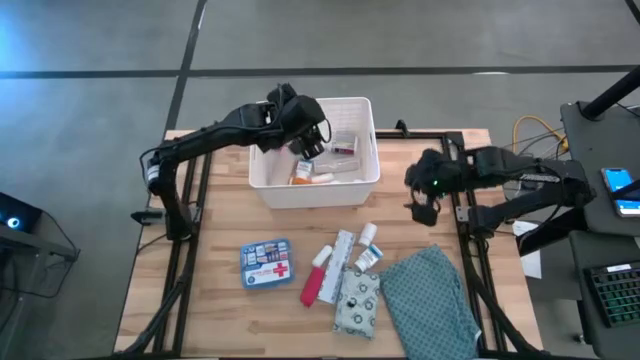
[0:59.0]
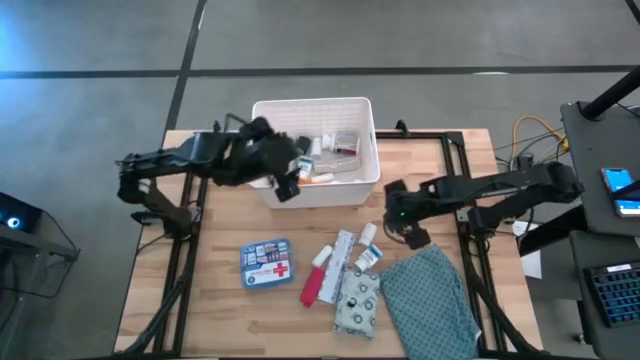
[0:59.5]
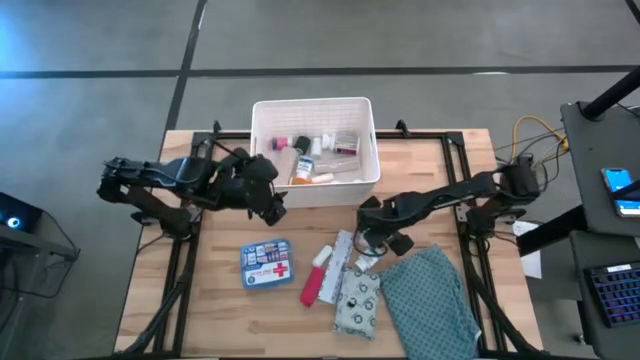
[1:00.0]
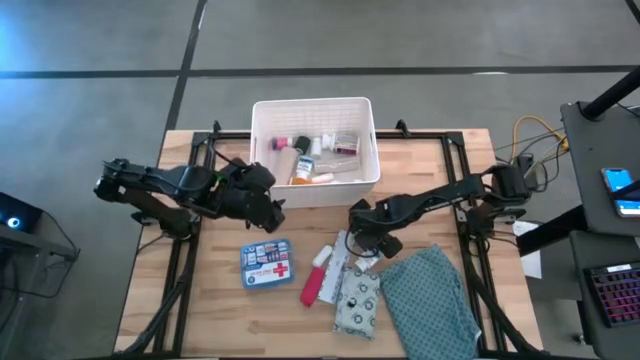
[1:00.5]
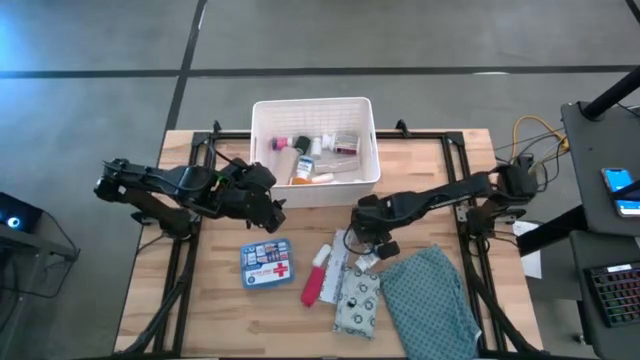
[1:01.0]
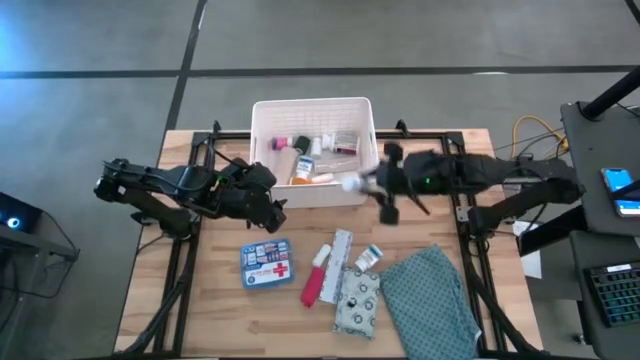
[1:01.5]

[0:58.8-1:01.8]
Task: Pick & place medical supplies in basket/bin
Put the white bottle into the white bin

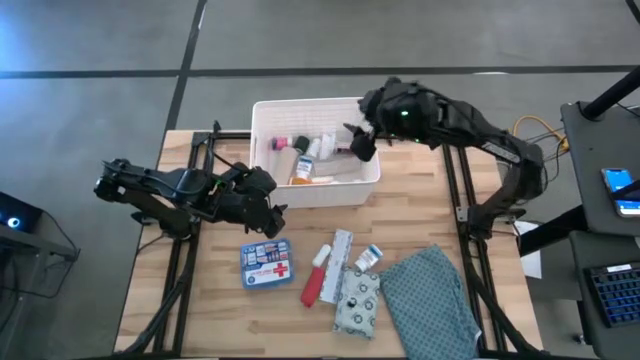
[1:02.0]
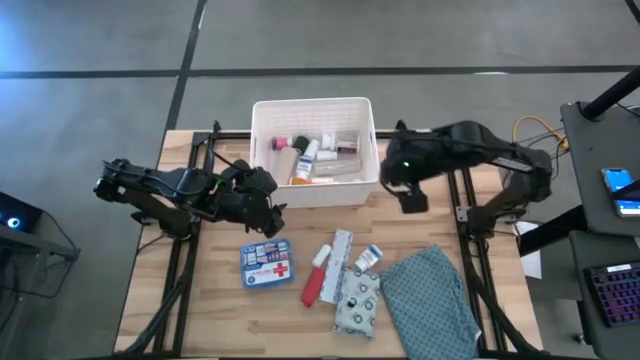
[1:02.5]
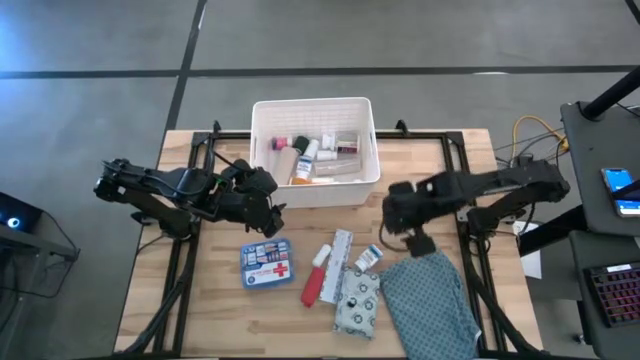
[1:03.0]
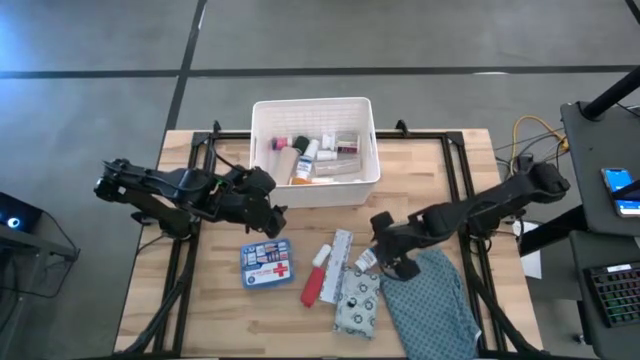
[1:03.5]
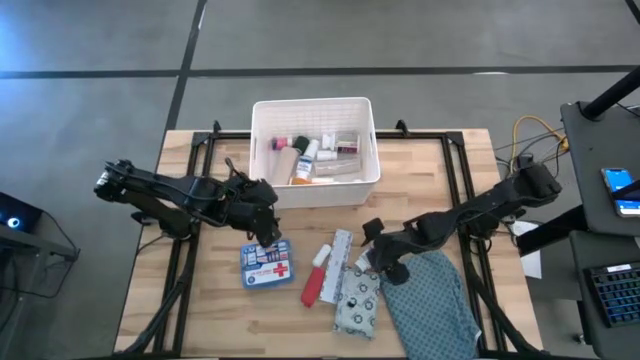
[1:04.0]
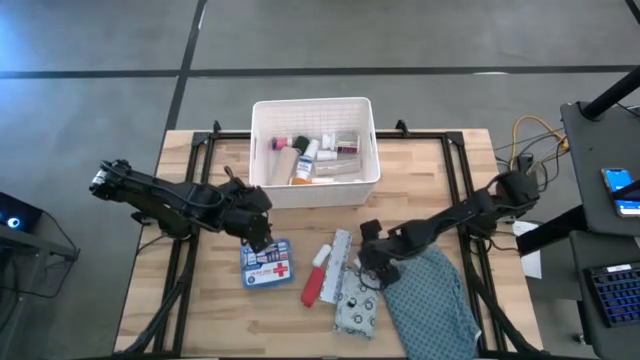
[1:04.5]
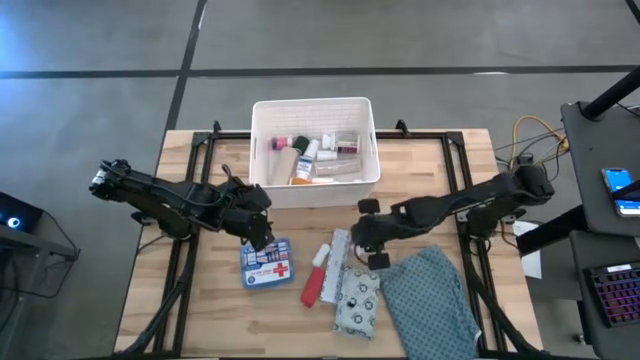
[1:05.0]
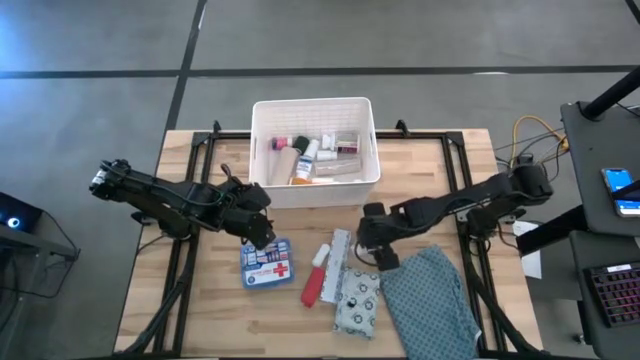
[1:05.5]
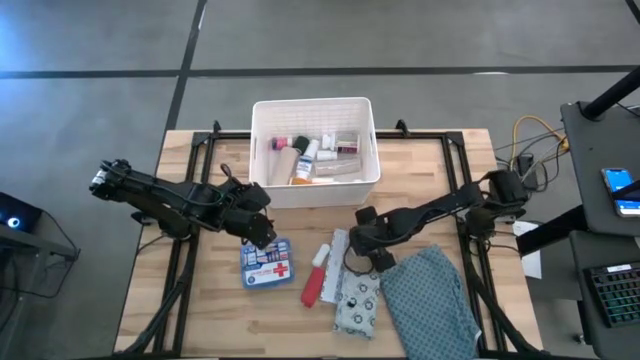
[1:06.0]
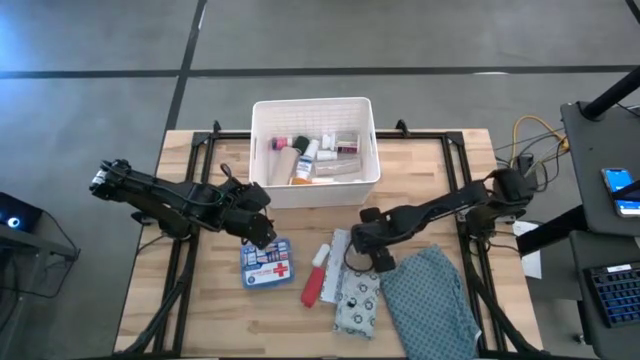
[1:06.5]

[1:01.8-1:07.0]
Put the white and blue bottle into the white bin

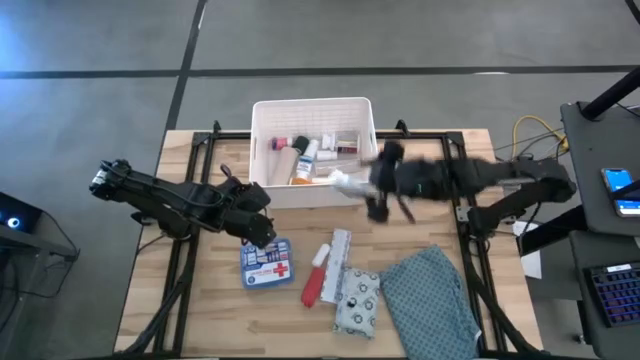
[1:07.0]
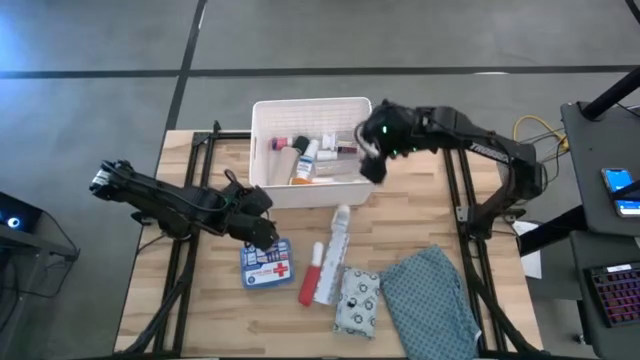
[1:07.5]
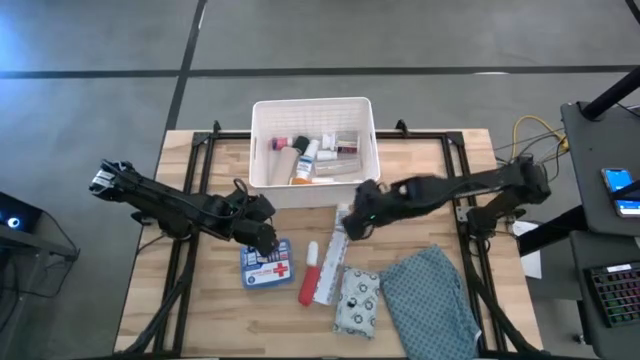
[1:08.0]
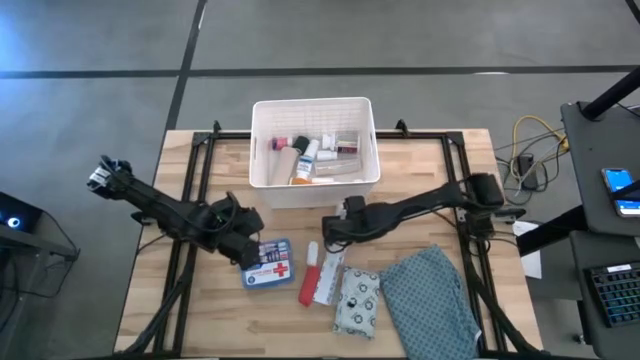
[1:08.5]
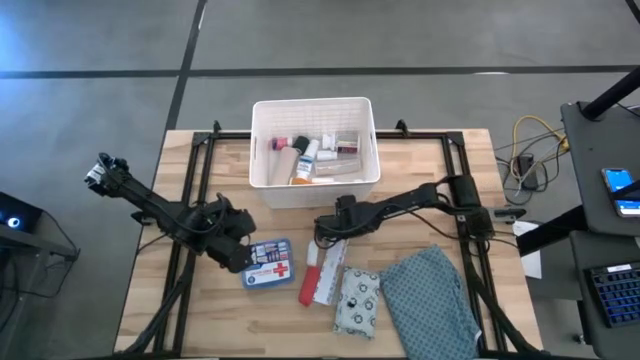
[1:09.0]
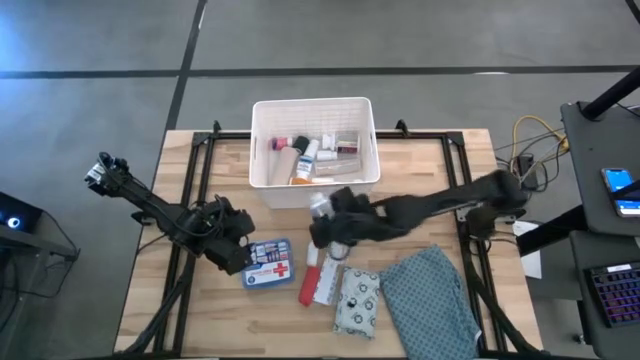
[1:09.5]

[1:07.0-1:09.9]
Put the white and blue bottle into the white bin

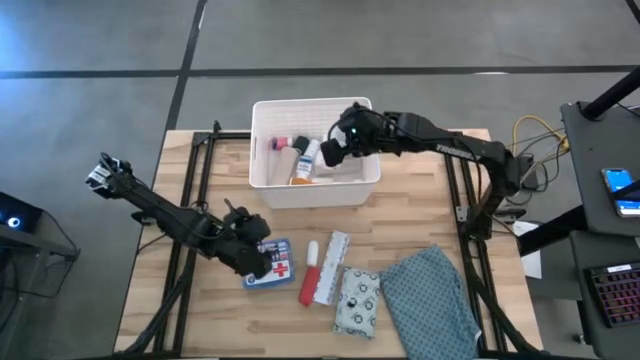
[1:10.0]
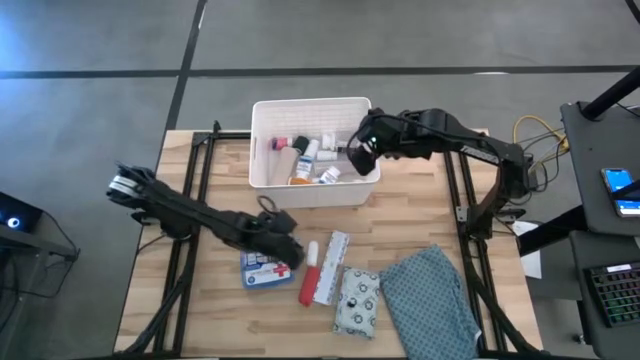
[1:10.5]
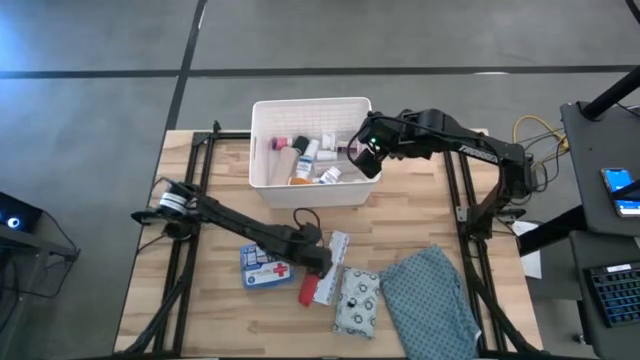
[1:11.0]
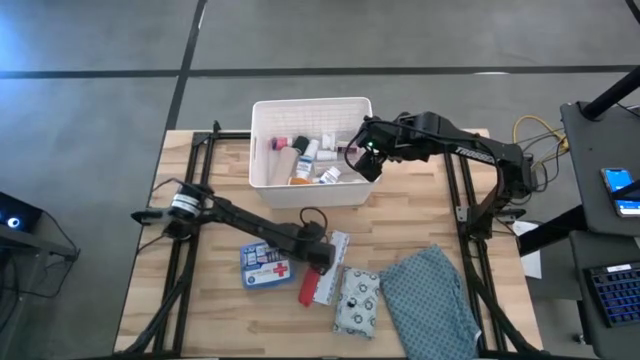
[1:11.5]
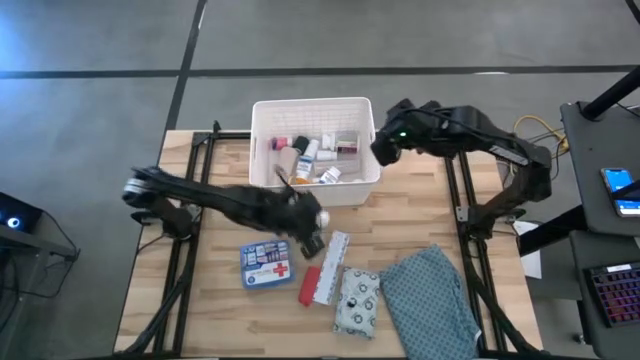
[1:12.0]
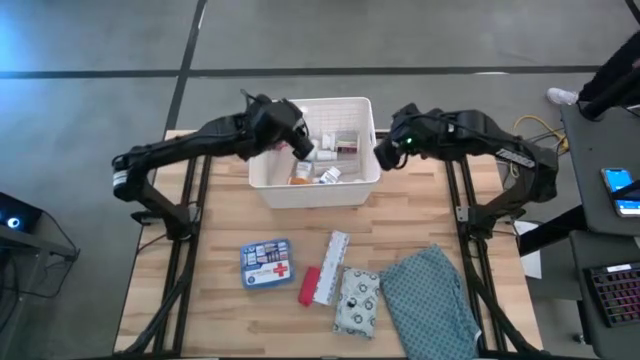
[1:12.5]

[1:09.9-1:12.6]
Put the white gauze into the white bin

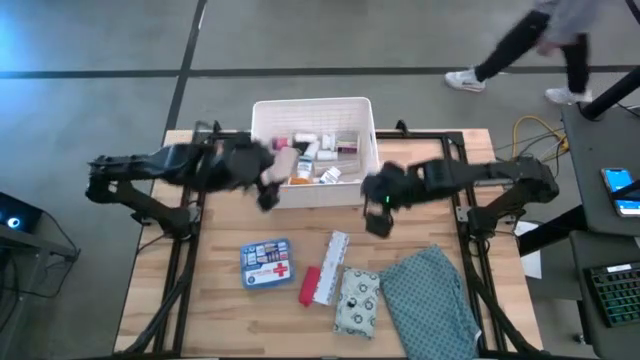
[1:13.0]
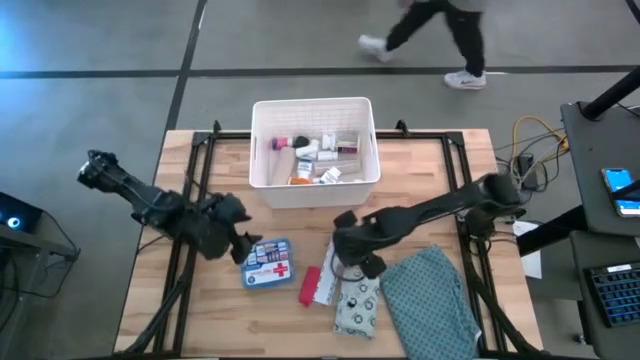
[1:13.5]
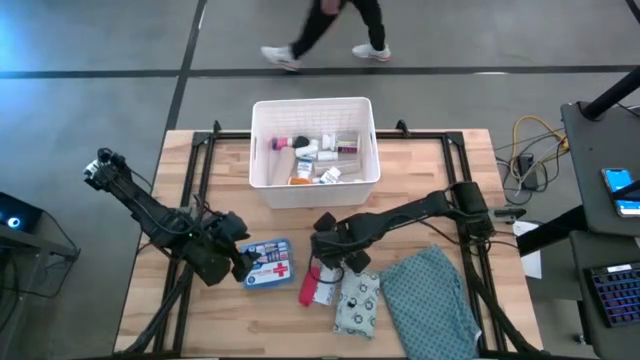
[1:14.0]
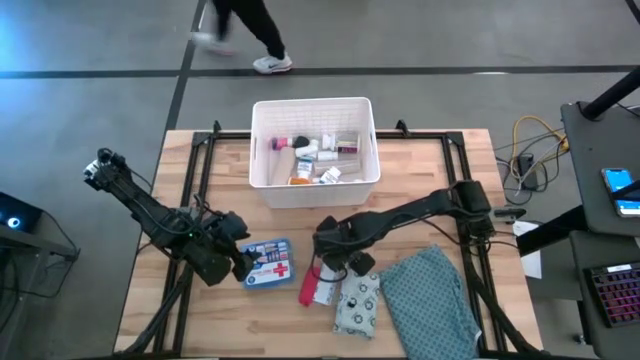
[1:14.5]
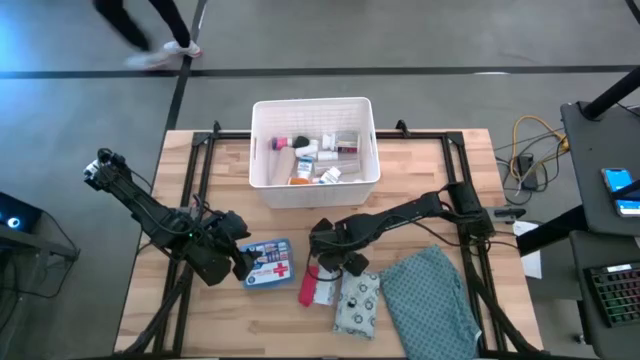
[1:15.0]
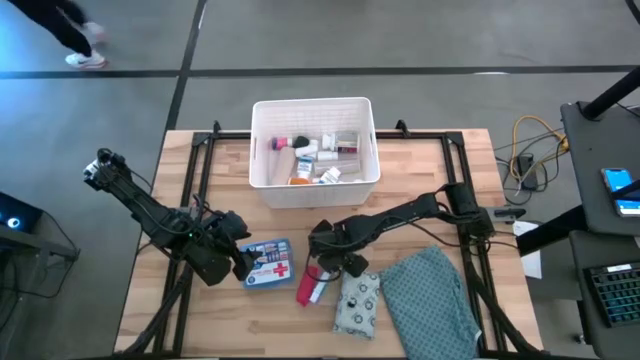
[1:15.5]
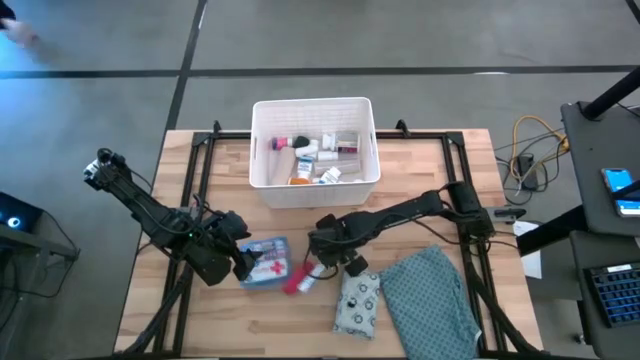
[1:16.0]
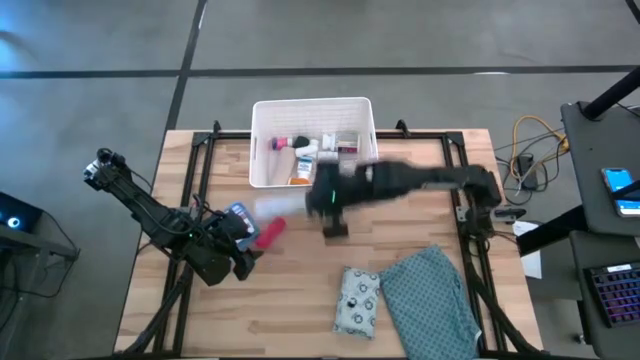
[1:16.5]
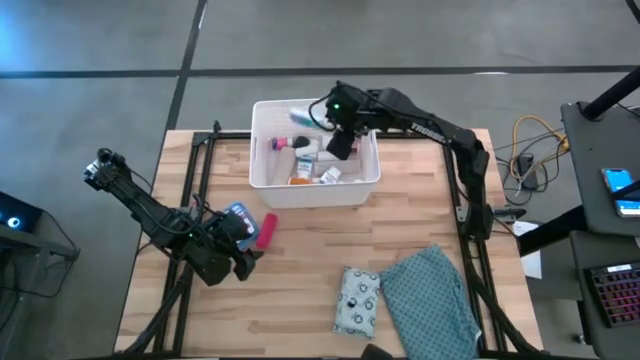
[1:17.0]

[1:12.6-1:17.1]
Put the white organizer into the white bin

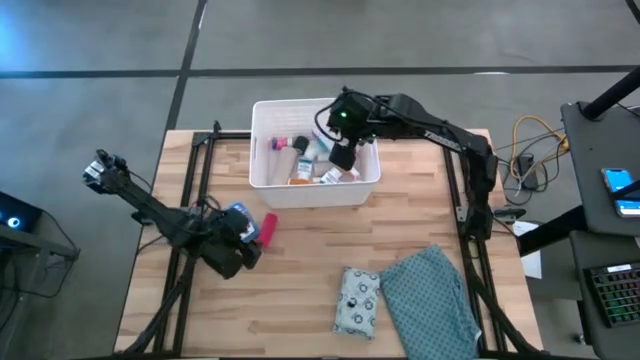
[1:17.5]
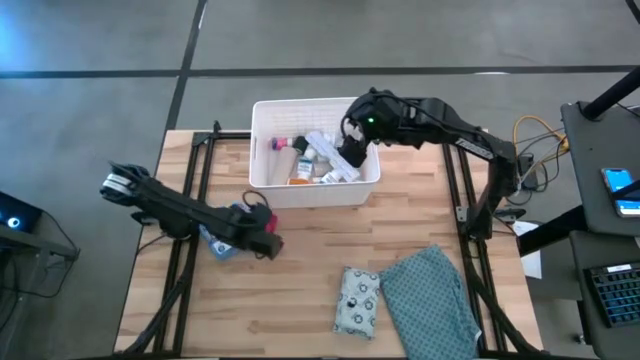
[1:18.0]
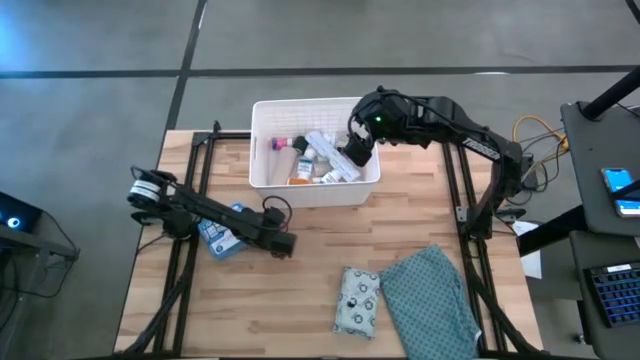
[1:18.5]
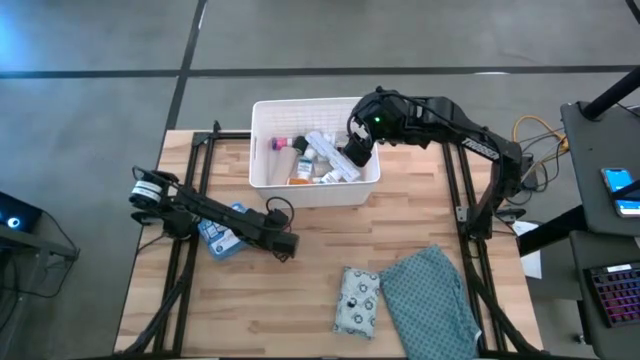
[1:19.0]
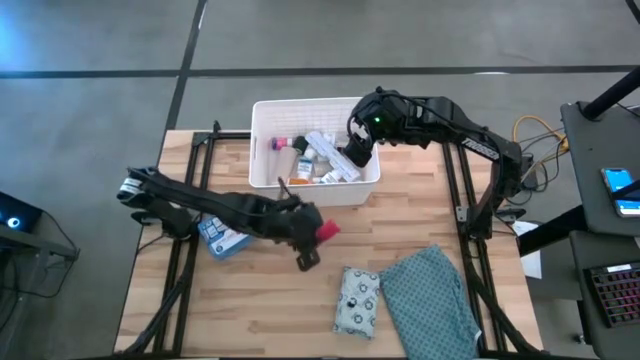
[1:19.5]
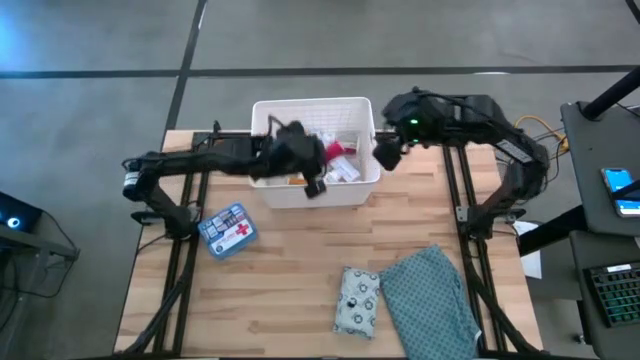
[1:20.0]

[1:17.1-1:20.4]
Put the red bandage into the white bin
